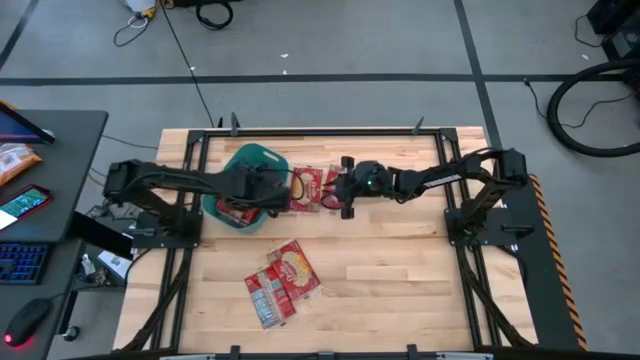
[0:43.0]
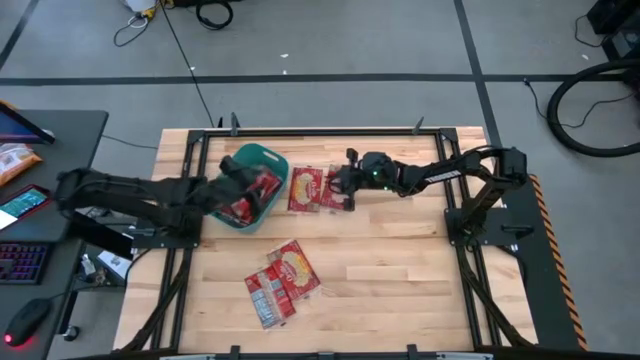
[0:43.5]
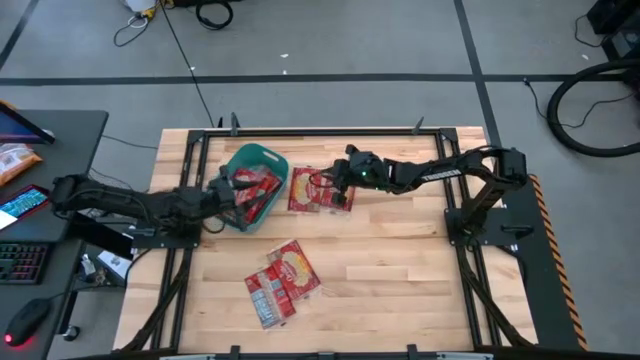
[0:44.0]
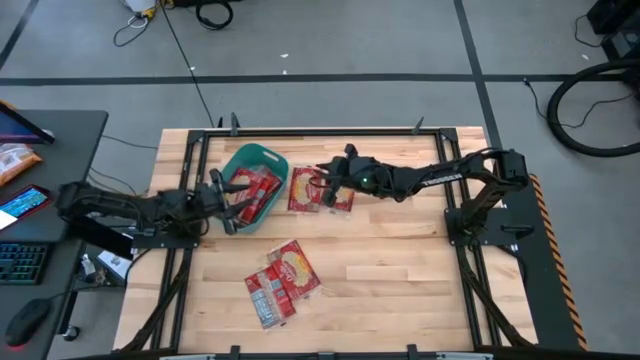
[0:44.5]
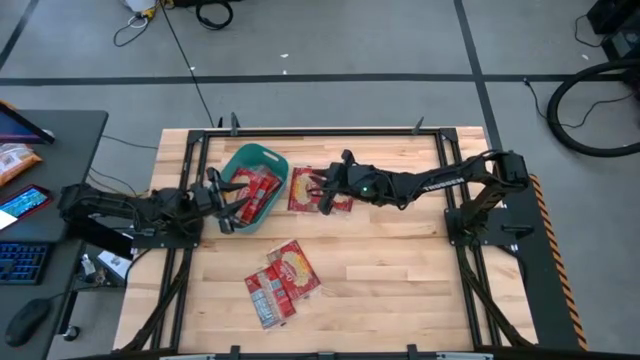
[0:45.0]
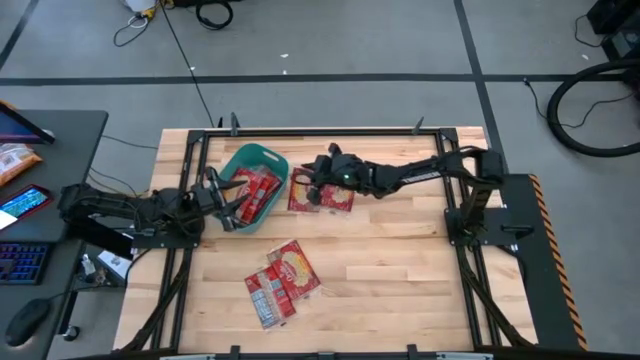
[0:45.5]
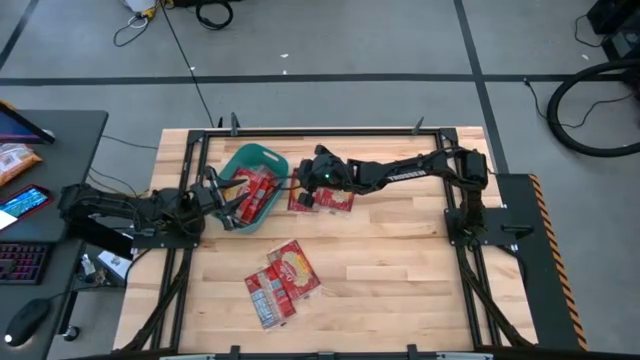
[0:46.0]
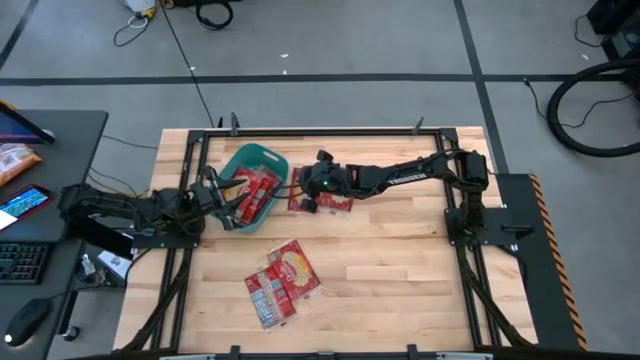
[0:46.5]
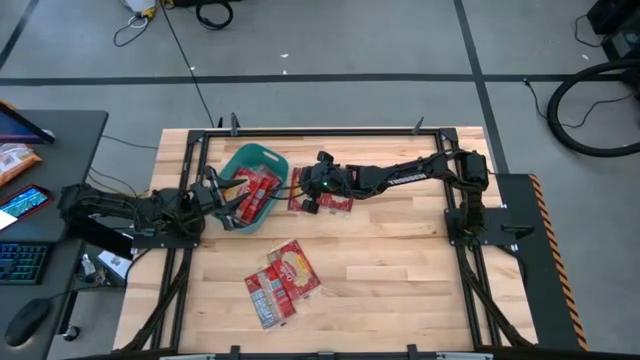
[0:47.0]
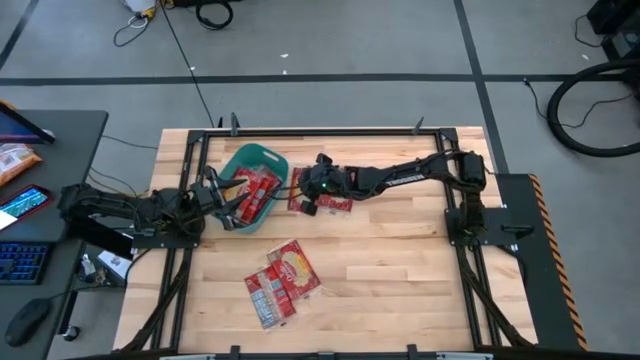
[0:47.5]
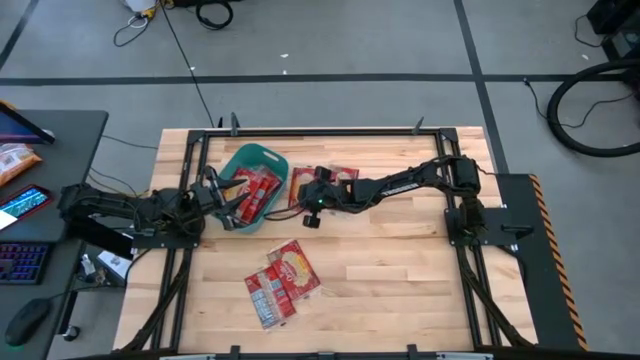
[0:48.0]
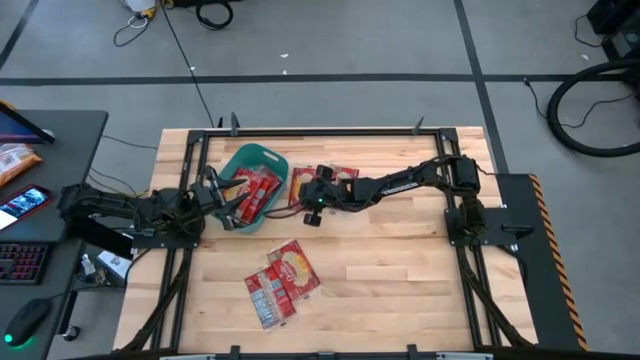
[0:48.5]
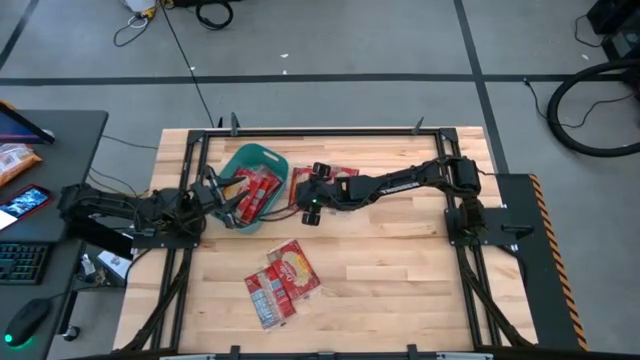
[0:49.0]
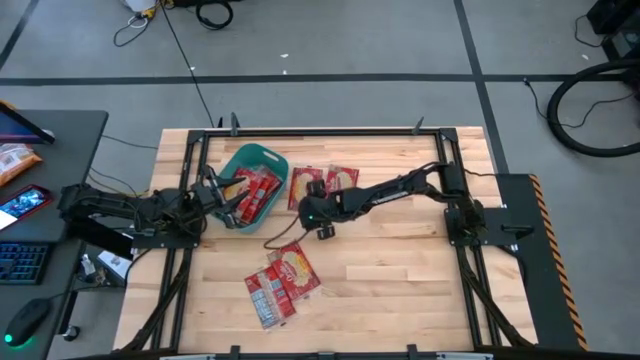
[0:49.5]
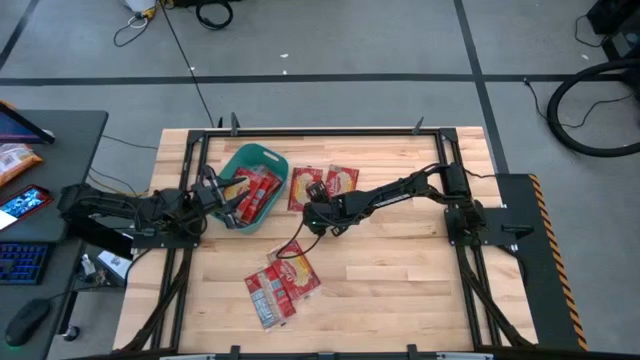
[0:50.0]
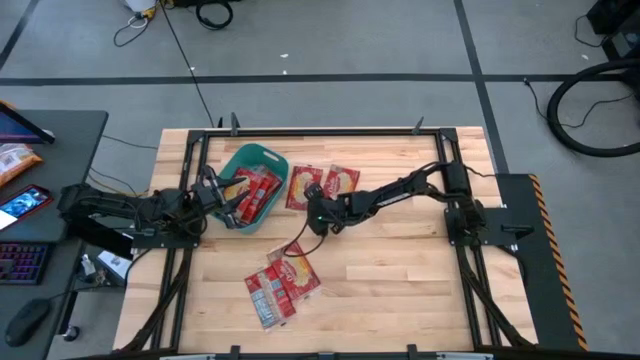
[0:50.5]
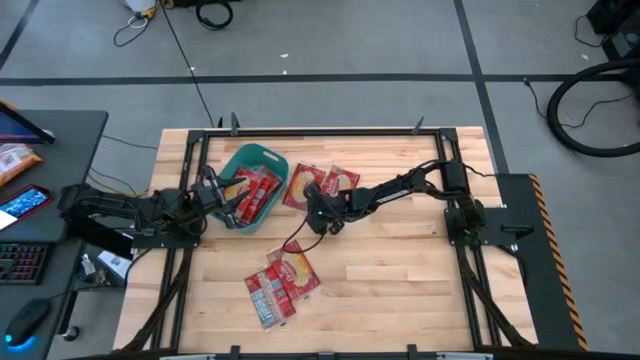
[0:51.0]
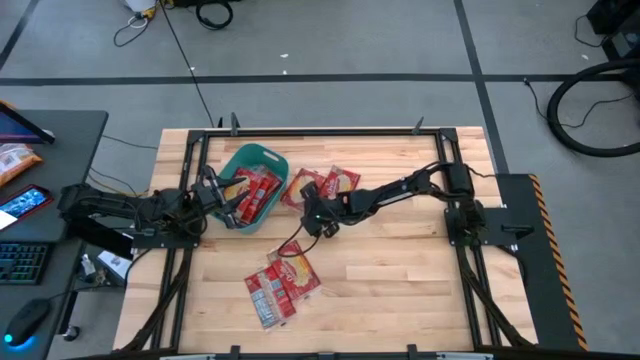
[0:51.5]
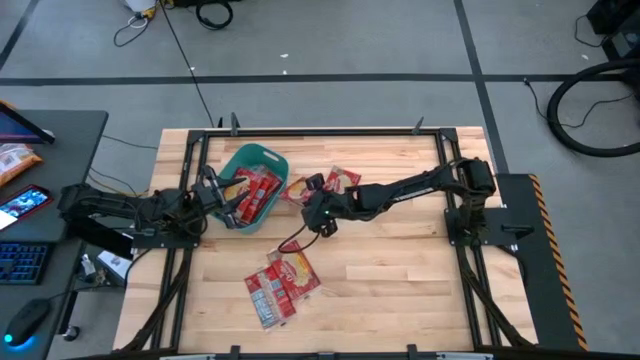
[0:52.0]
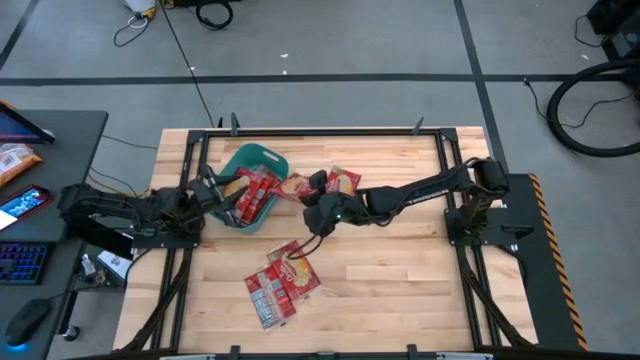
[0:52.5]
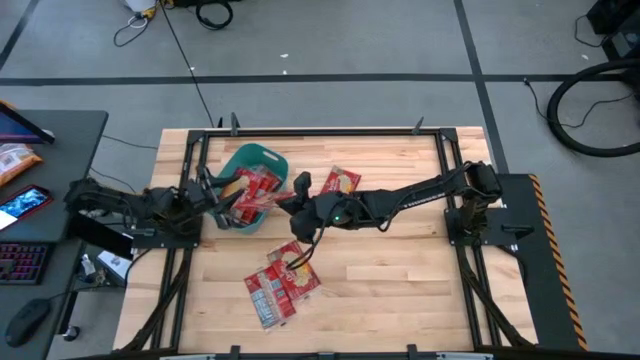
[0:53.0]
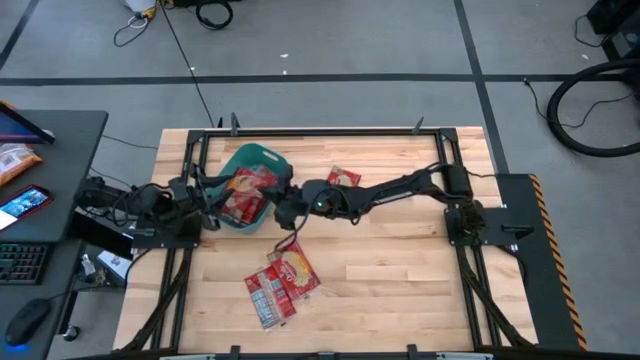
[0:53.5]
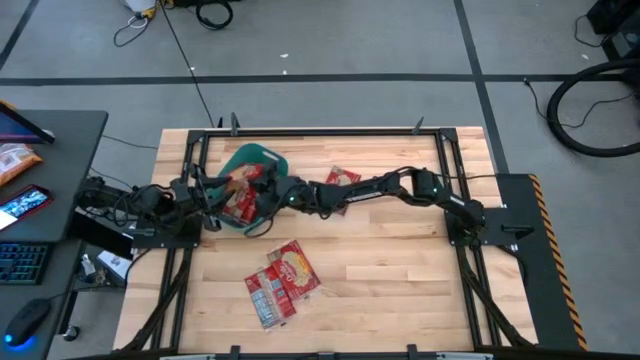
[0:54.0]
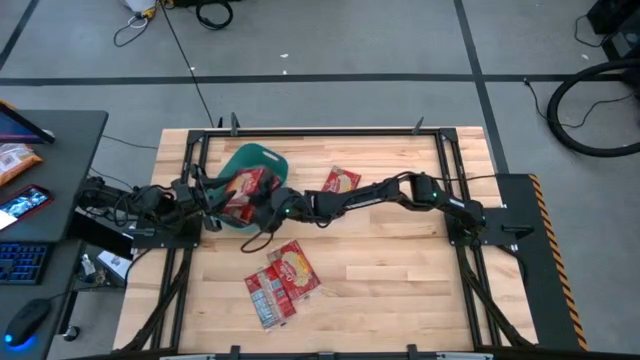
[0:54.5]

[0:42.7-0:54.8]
Task: Sort popcorn bags into baskets
Put the red popcorn bag into the green bin
